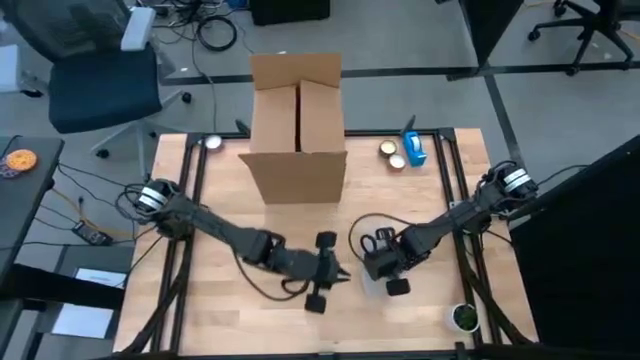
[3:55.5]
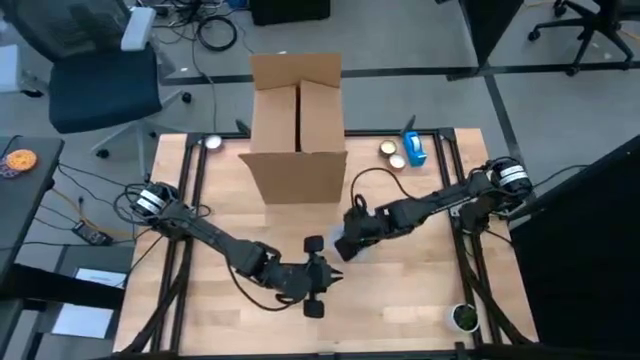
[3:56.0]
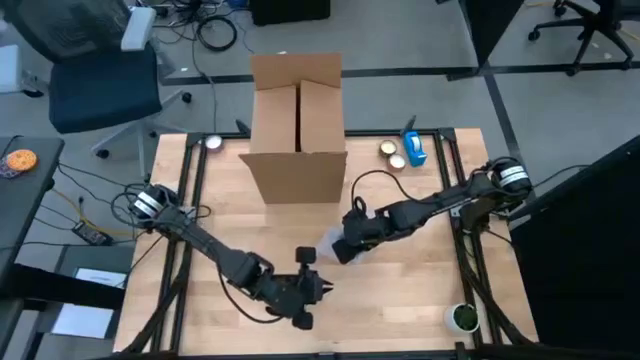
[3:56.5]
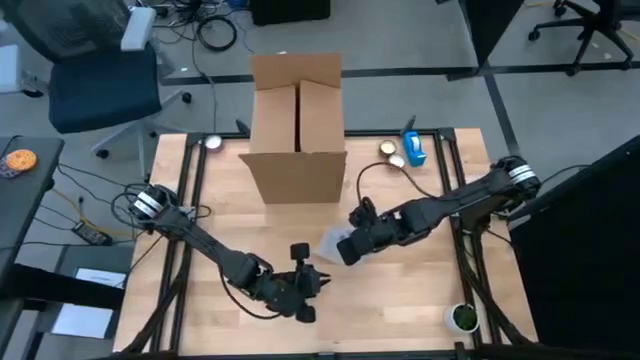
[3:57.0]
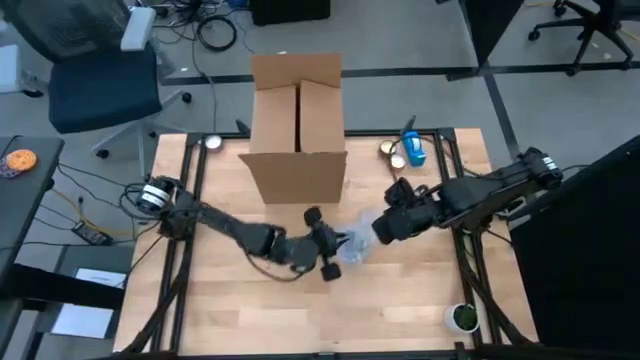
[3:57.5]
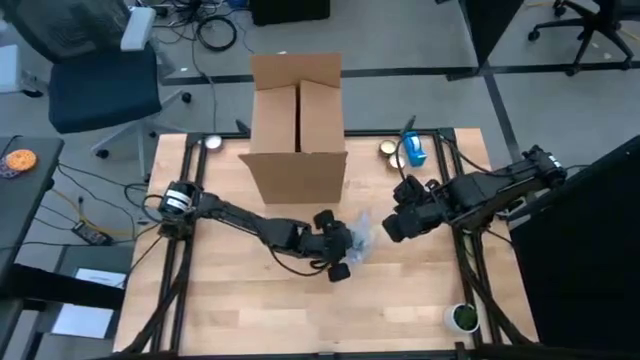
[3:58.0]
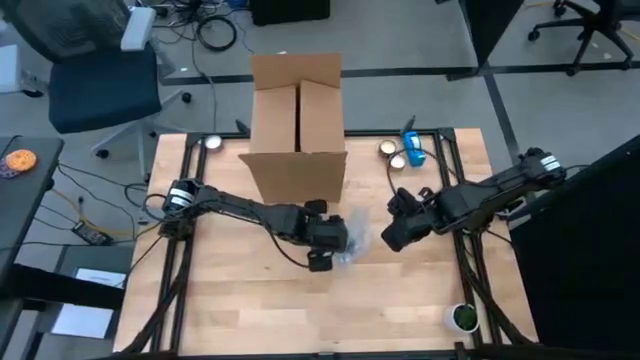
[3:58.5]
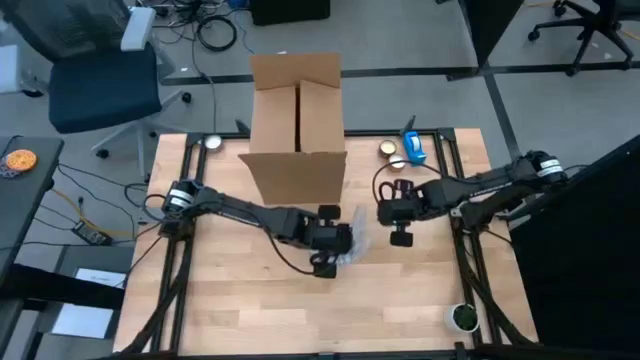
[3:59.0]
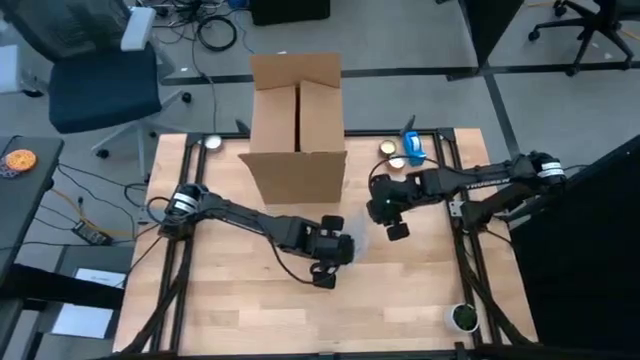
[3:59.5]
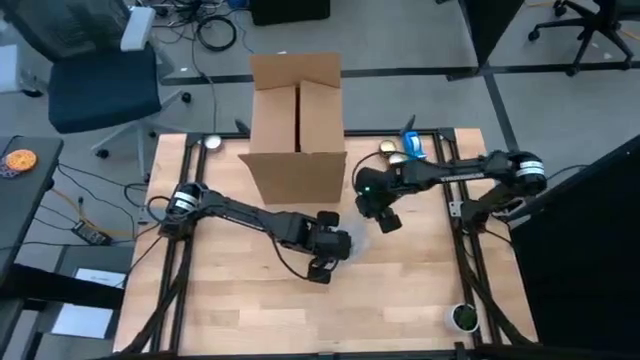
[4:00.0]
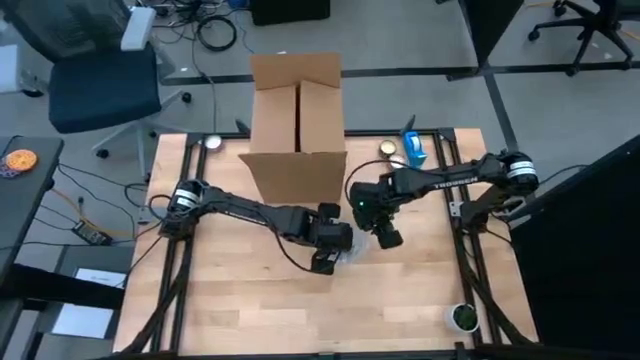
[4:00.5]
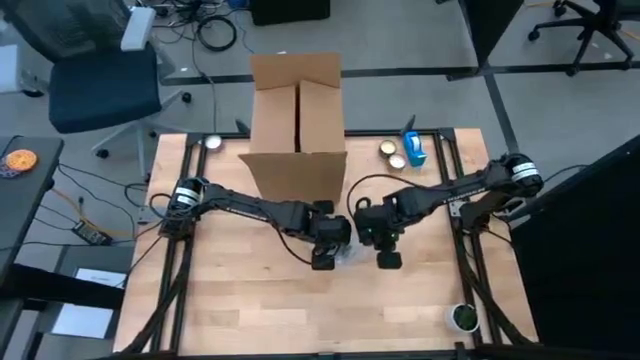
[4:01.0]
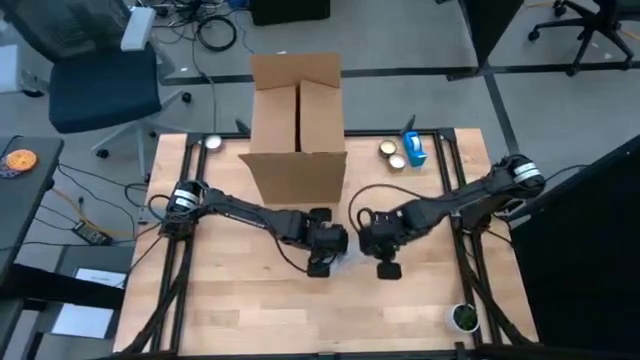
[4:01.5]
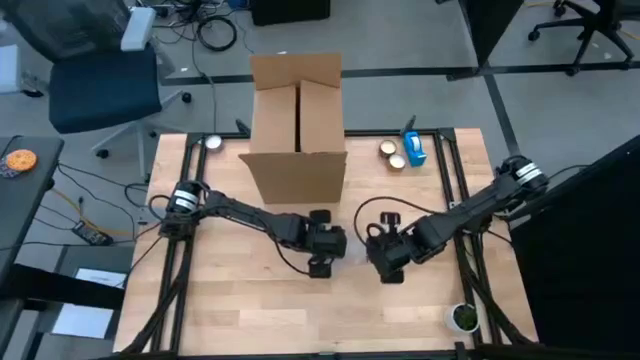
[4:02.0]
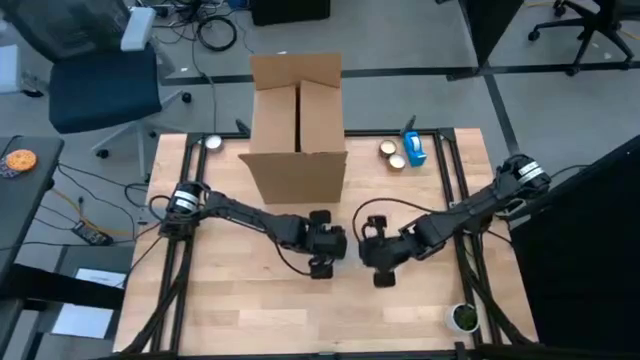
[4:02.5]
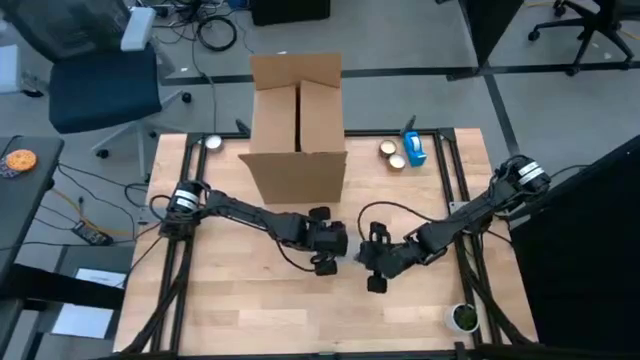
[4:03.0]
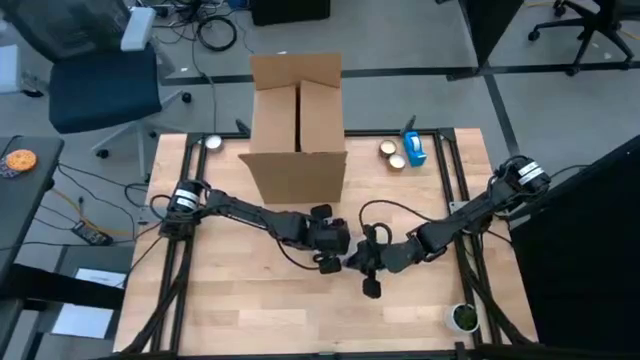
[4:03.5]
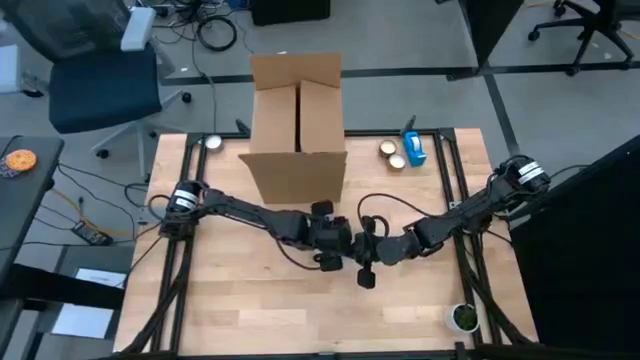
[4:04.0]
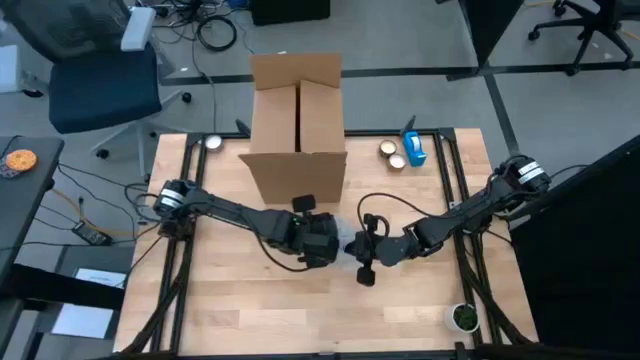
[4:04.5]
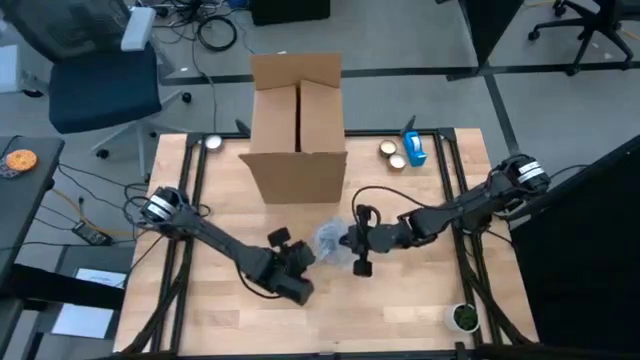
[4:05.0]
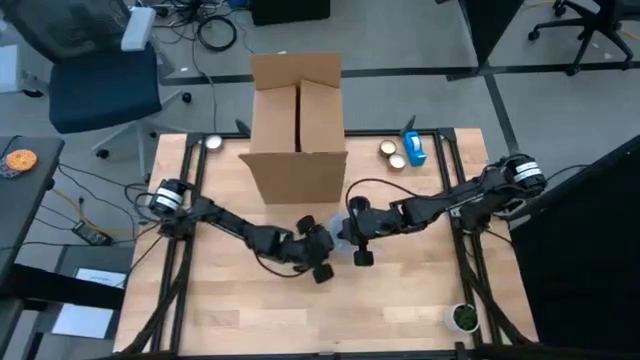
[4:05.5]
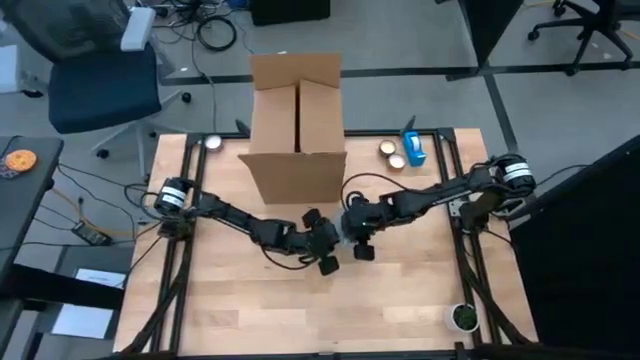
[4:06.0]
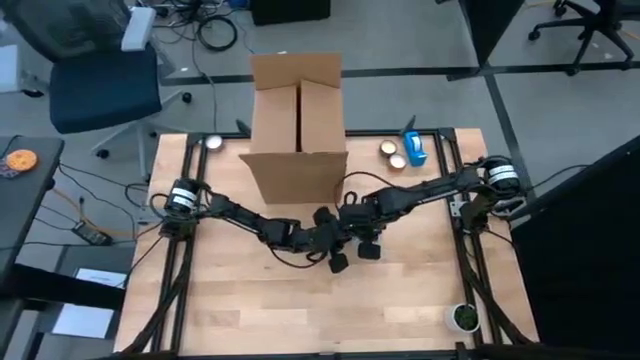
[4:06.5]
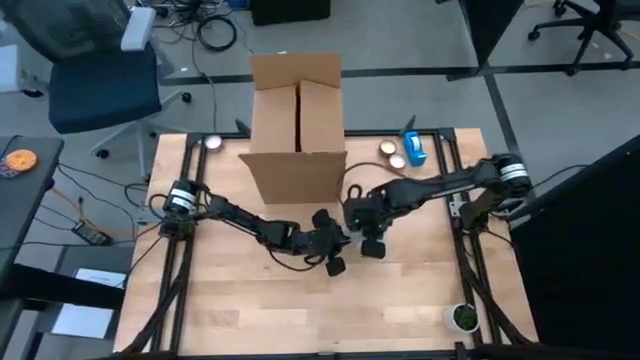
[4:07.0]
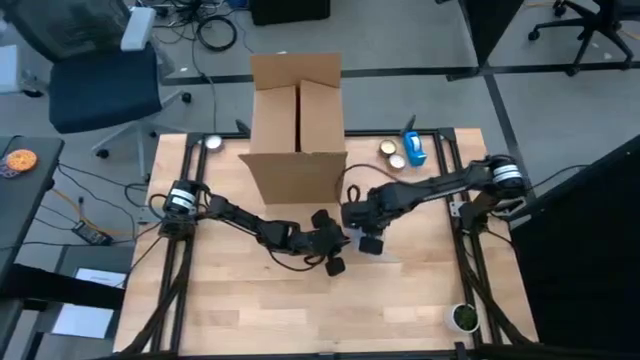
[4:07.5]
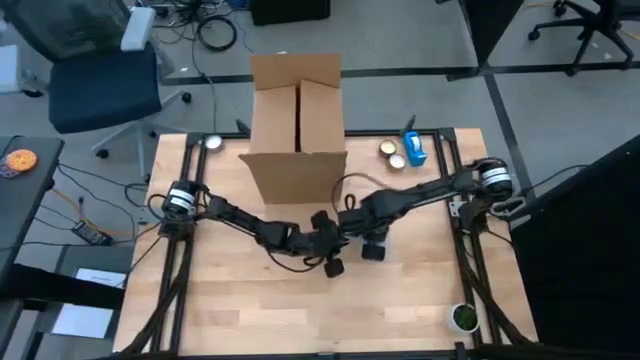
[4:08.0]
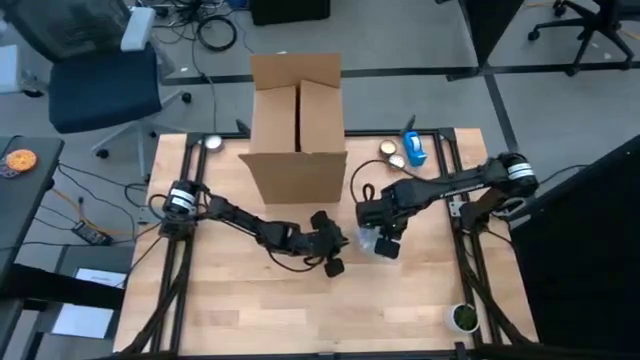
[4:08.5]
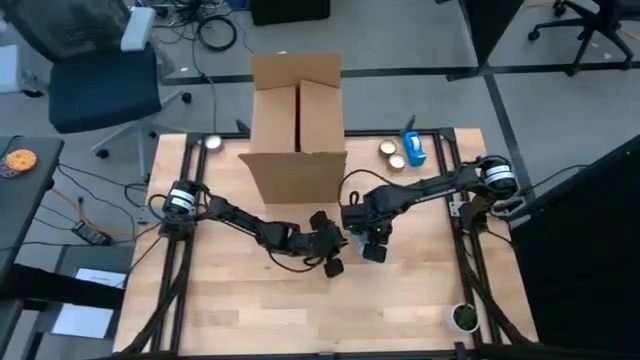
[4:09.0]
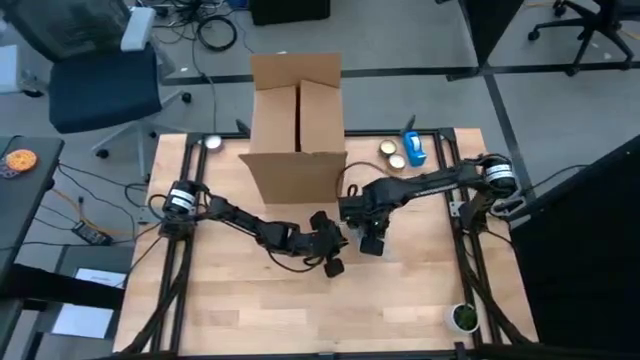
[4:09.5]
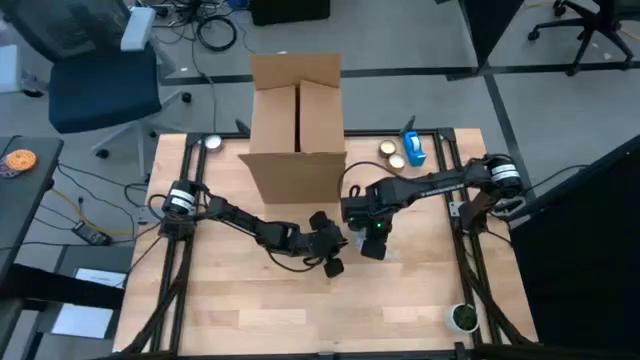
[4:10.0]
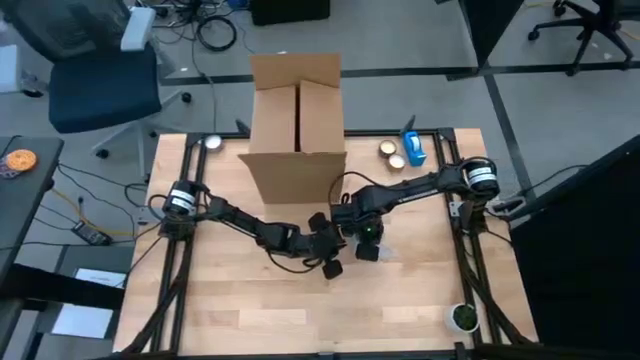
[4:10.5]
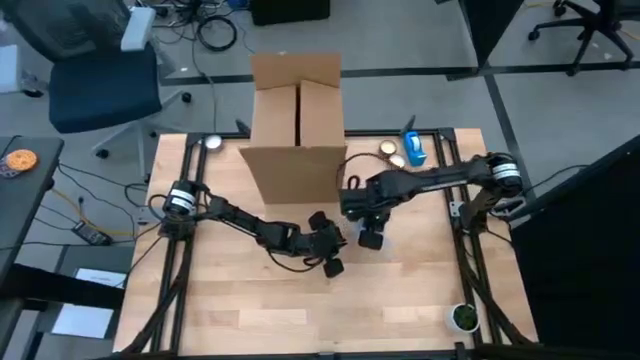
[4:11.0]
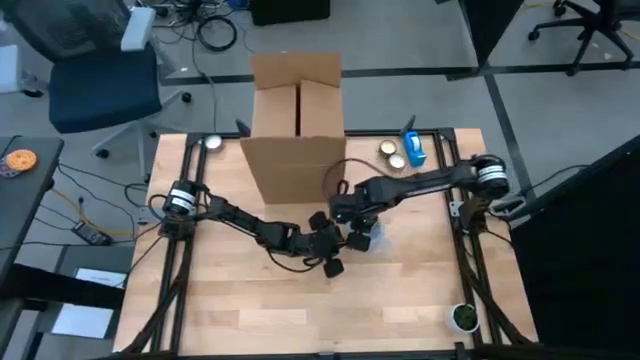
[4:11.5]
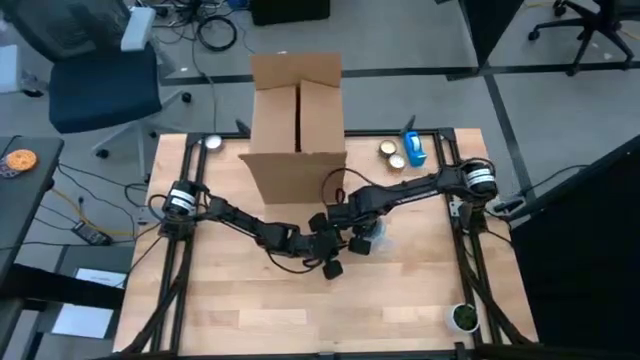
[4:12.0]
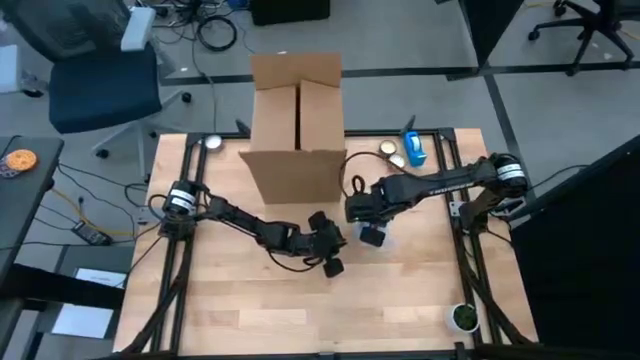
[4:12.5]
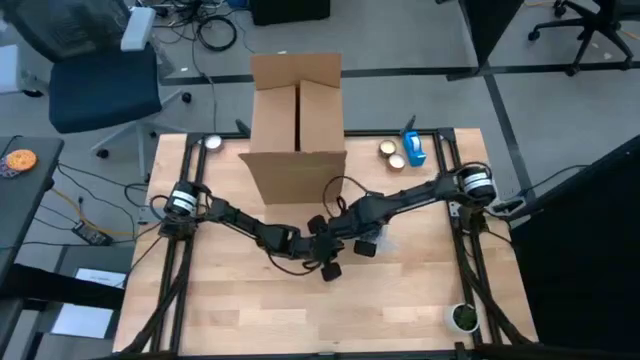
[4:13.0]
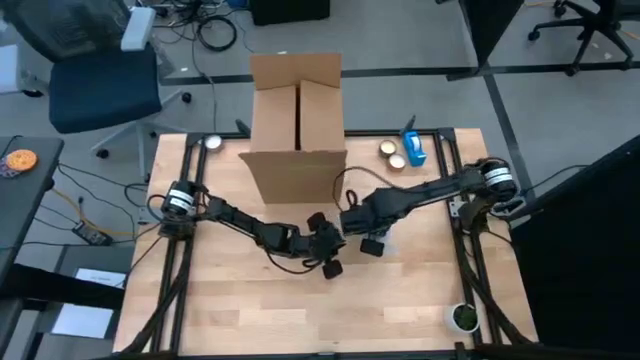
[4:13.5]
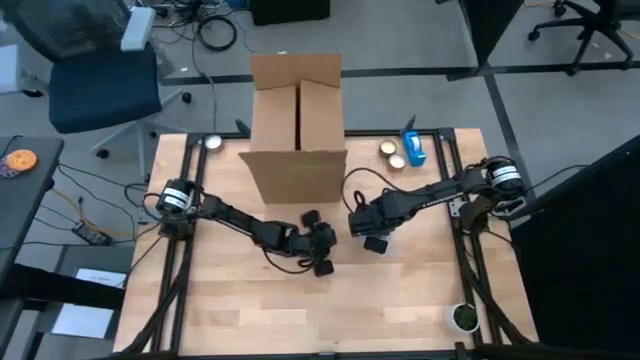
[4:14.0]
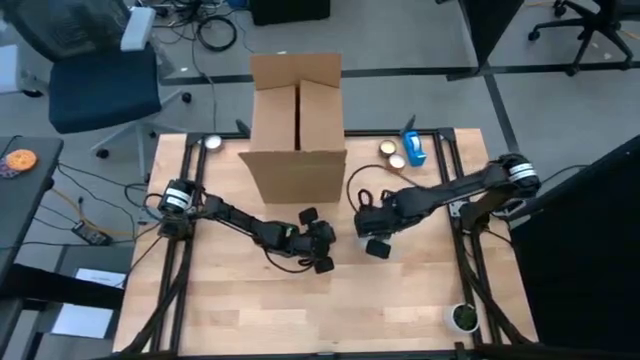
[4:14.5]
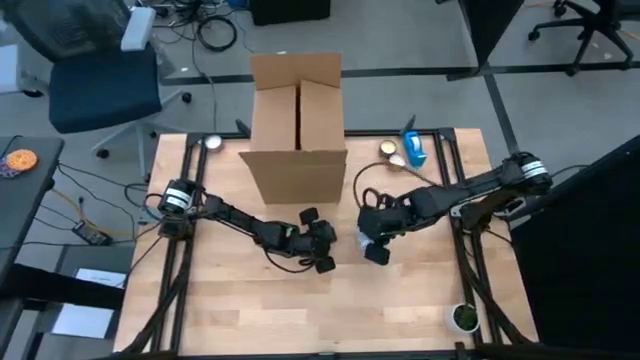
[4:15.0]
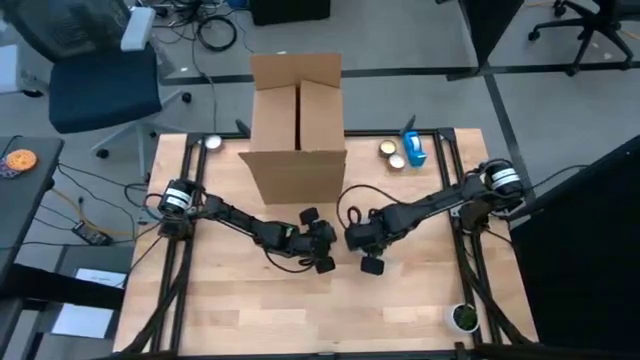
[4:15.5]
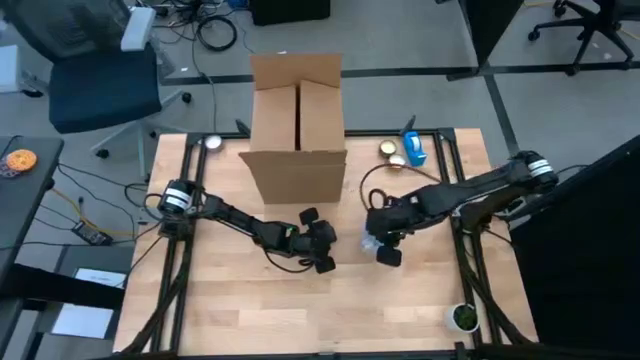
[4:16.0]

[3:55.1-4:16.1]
Task: wrap mug
Wrap the blue mug with bubble wrap

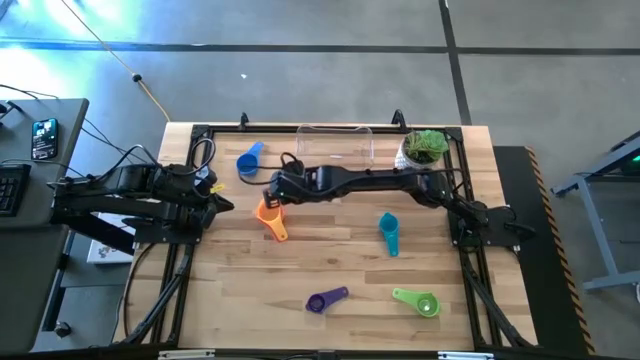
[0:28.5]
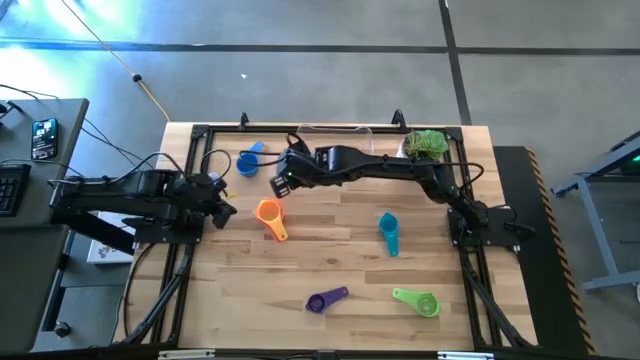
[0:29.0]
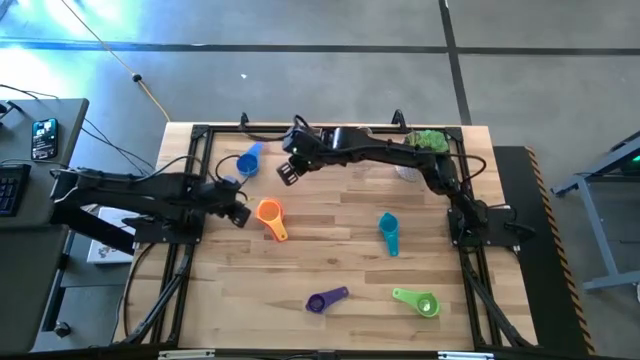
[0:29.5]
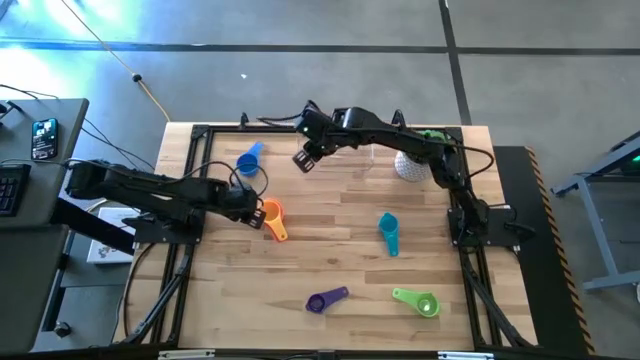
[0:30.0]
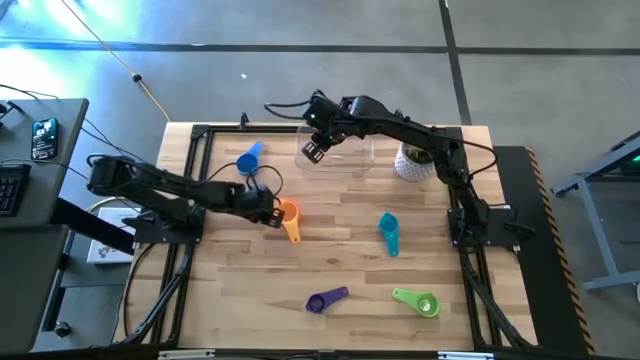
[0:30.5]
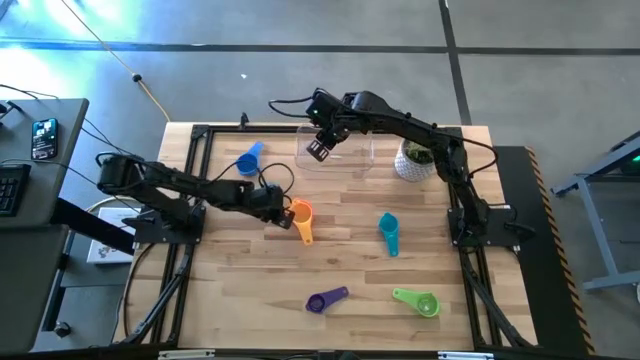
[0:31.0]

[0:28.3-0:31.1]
Task: Nest measuring cups in basket
Adjust the stacked measuring cups
